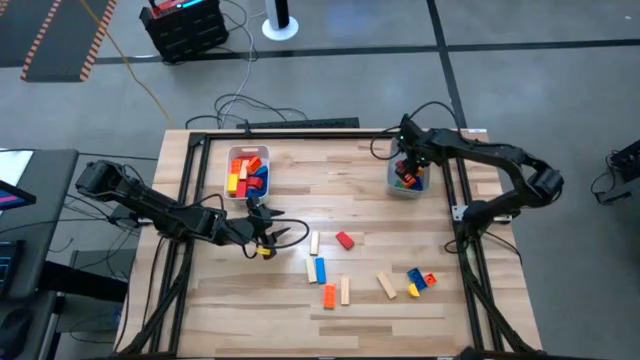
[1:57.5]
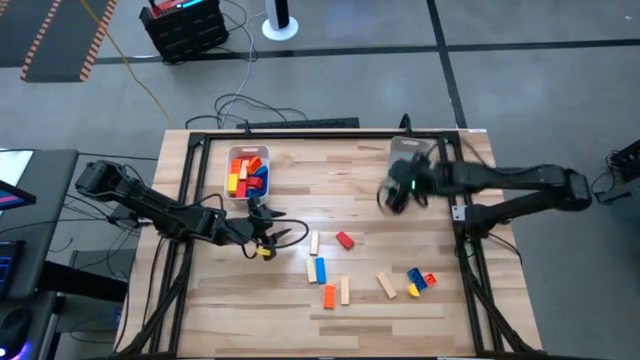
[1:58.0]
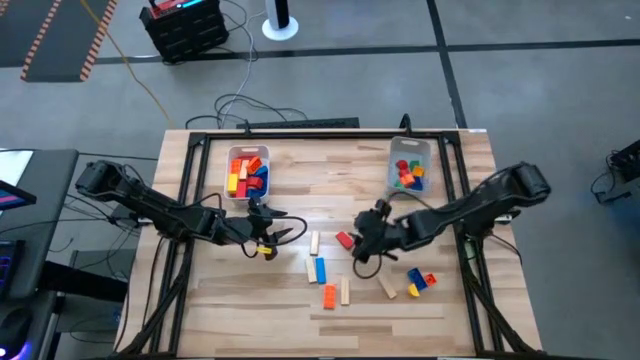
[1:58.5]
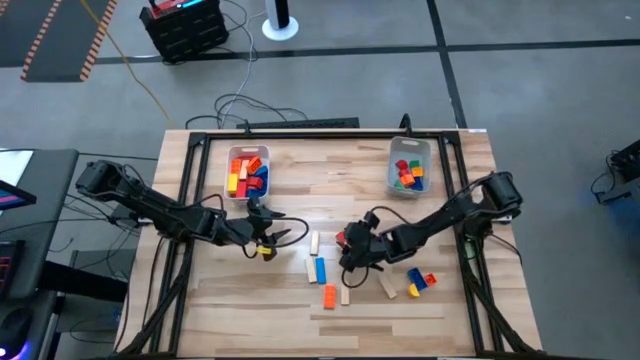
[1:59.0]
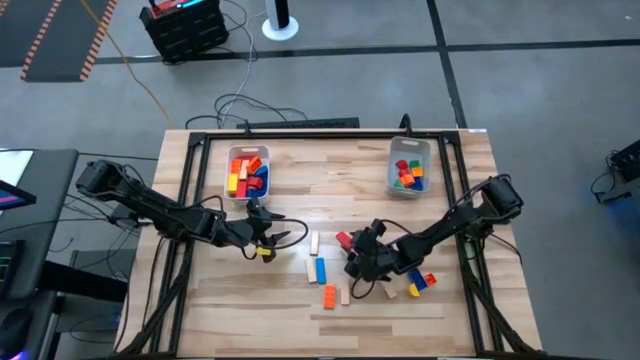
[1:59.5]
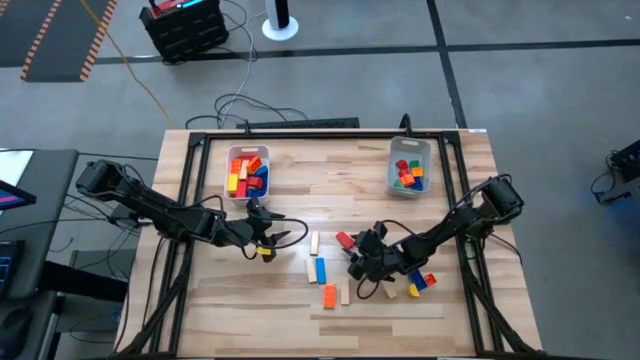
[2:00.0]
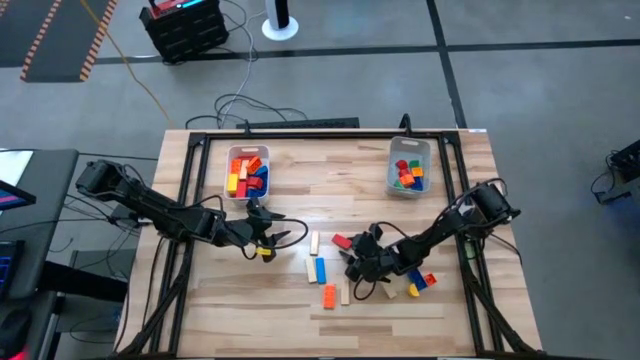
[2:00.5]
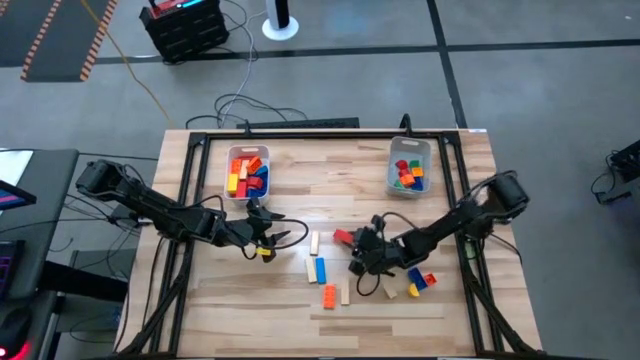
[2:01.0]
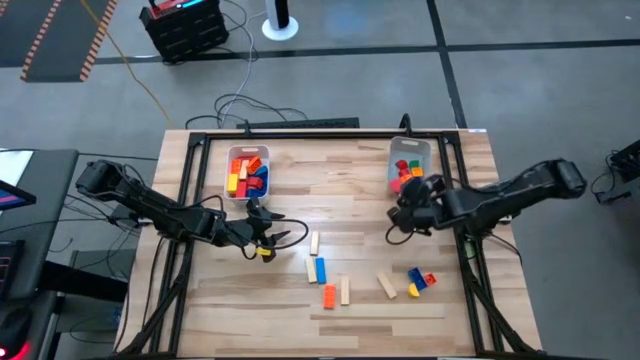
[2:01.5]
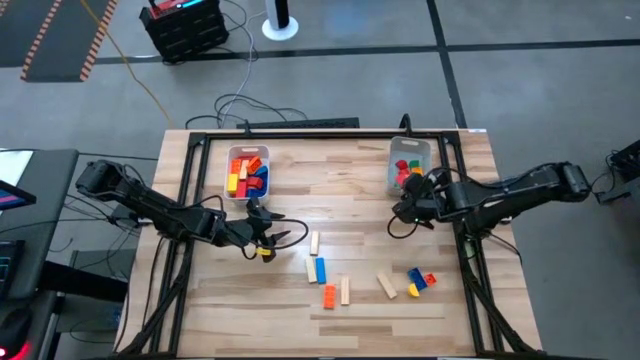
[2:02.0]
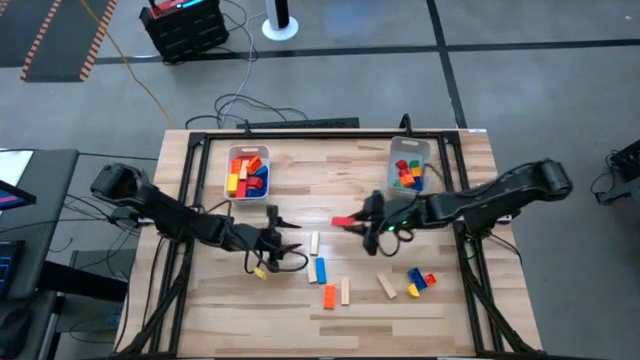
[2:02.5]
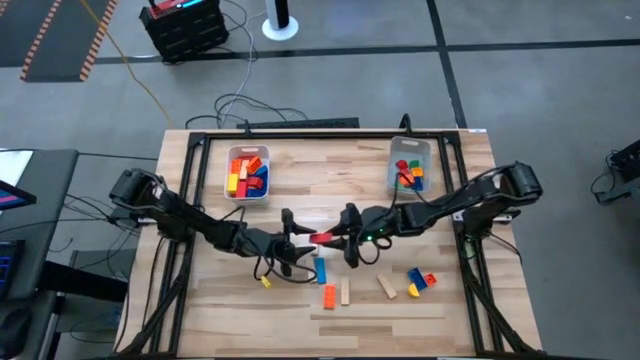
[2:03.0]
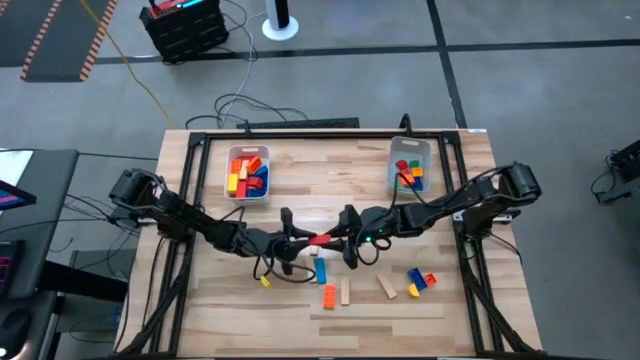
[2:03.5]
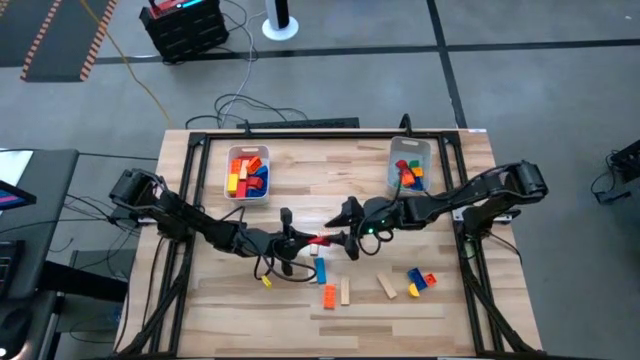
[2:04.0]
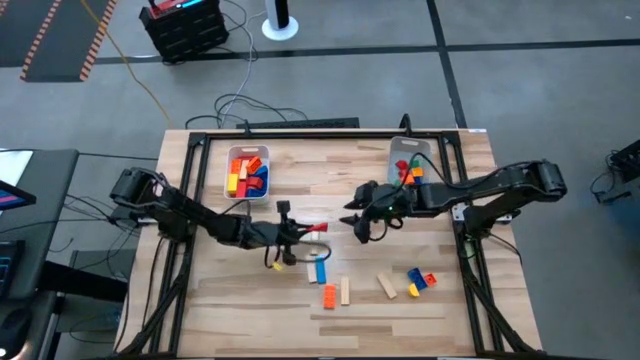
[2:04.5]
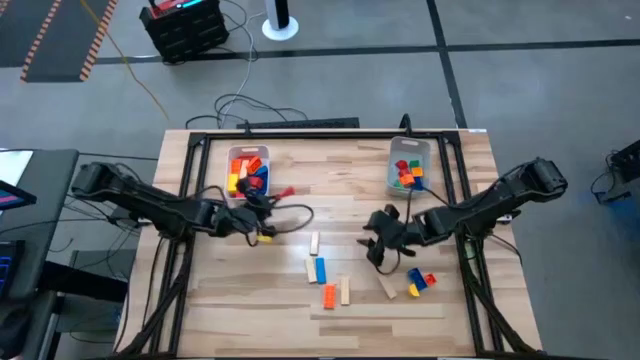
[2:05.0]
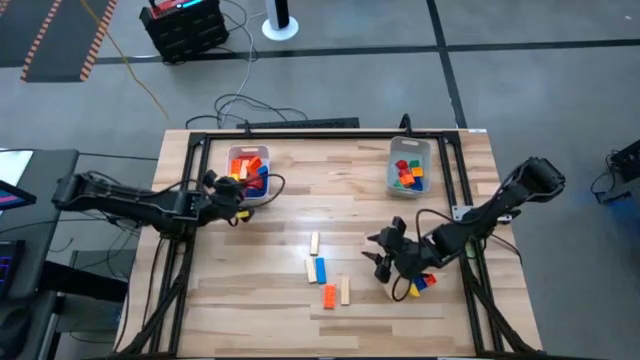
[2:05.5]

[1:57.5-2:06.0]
Task: Sort blocks by size
Put the large red block into the white bin

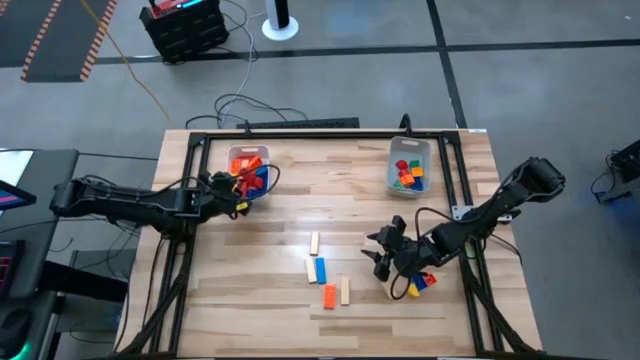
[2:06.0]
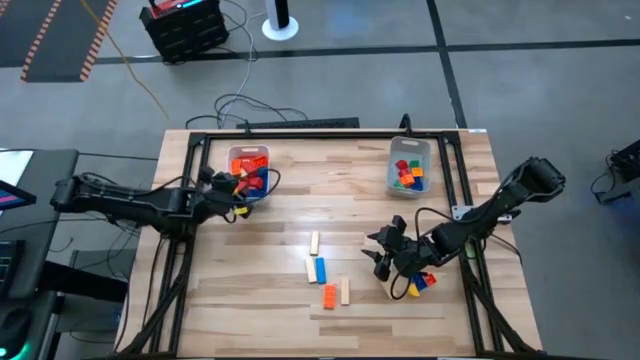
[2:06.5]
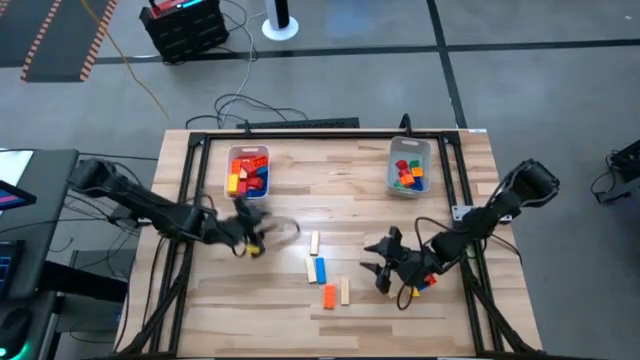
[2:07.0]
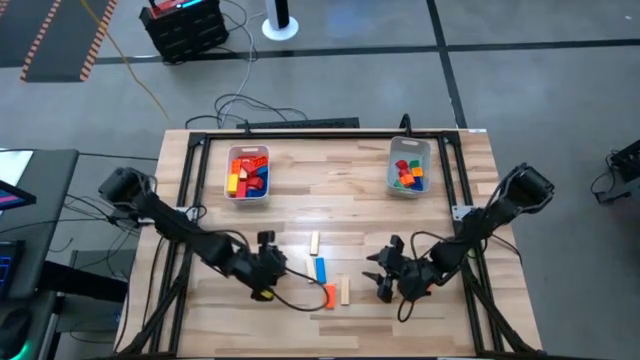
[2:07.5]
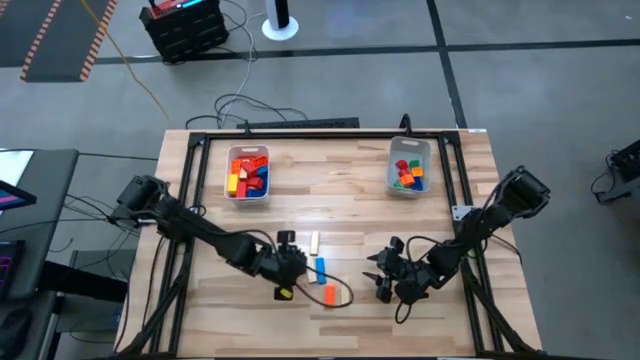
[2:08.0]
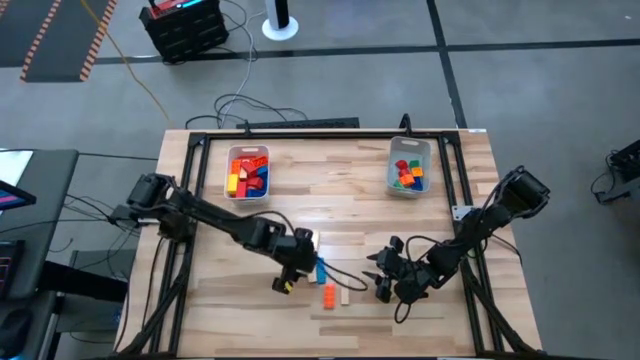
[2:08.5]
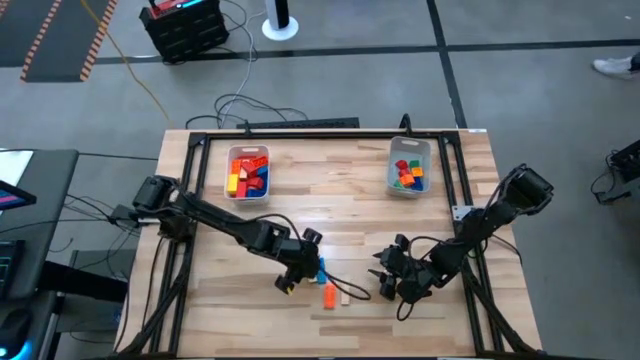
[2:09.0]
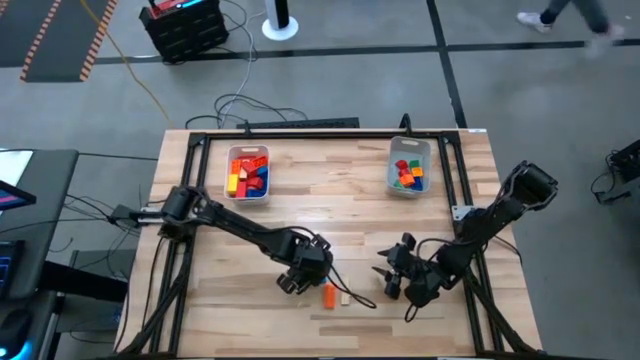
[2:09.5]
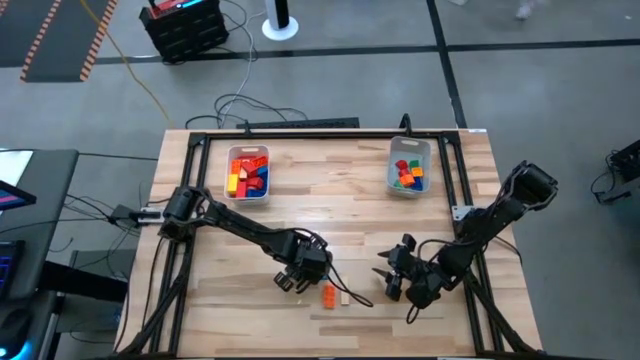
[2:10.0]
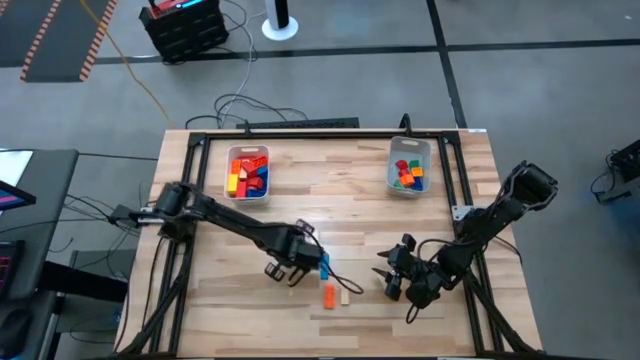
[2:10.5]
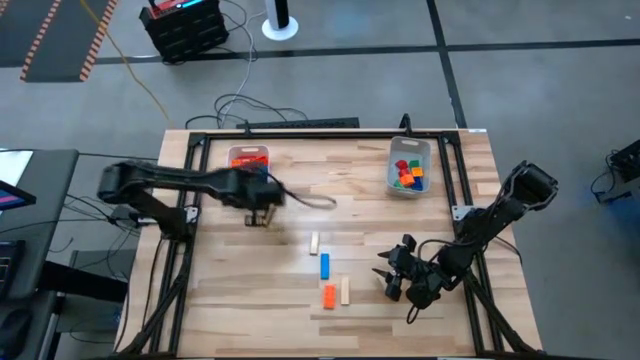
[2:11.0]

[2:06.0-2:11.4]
Put the large light brown block into the white bin

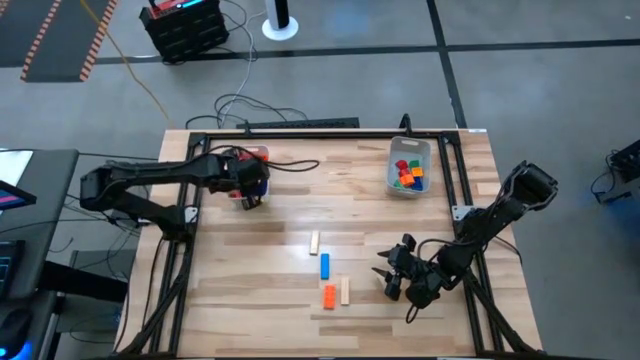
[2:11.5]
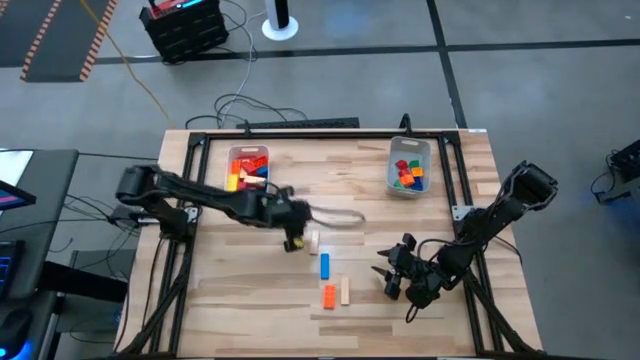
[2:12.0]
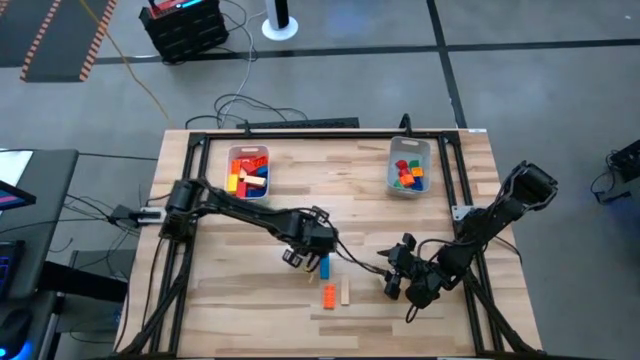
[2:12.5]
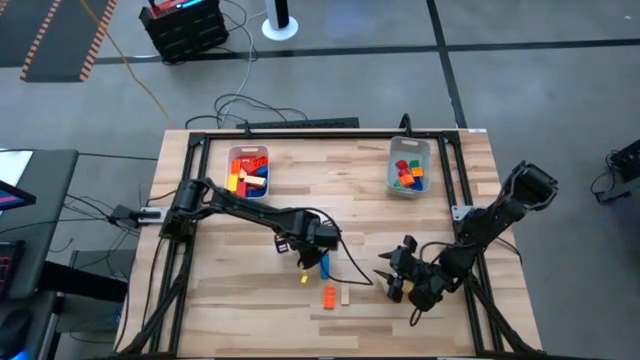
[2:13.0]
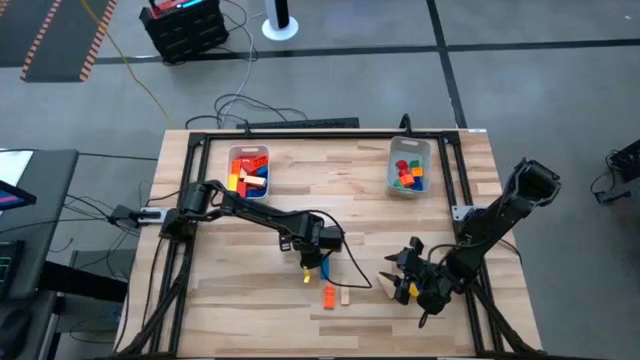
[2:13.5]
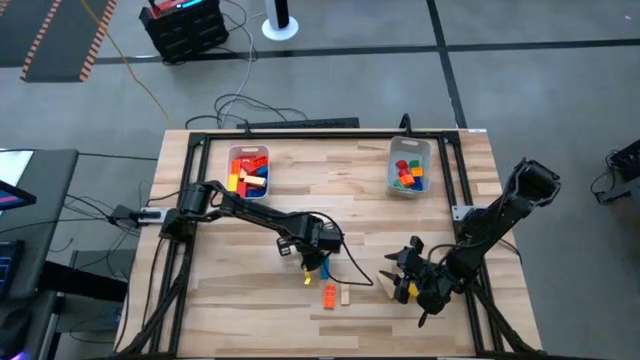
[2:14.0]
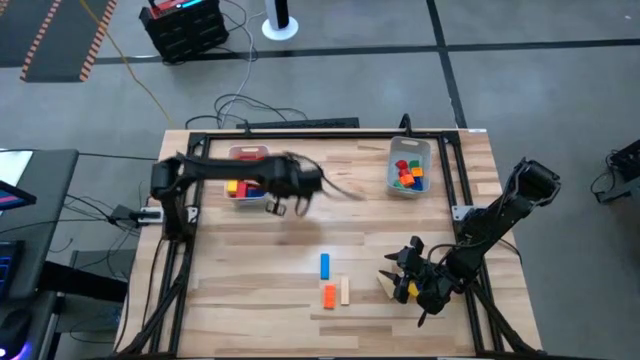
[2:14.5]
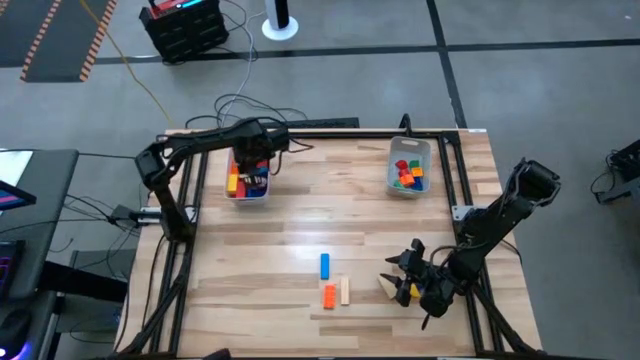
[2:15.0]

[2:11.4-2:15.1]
Put the large light brown block into the white bin

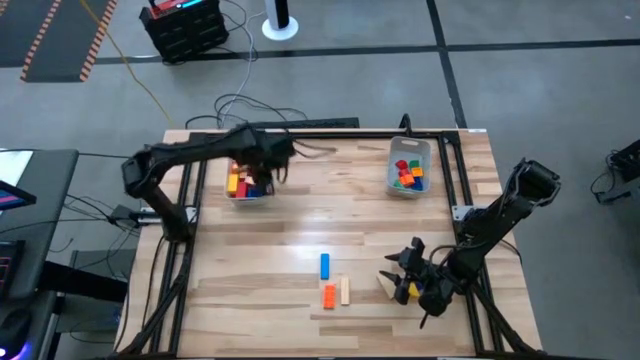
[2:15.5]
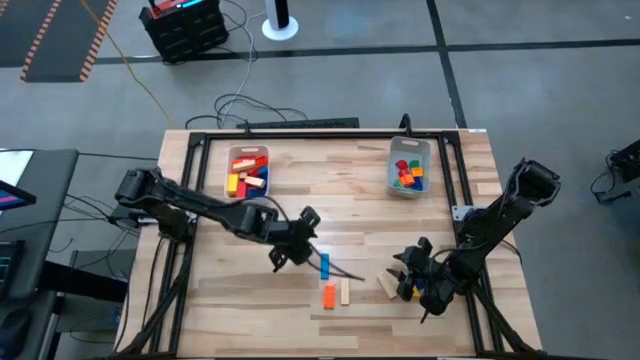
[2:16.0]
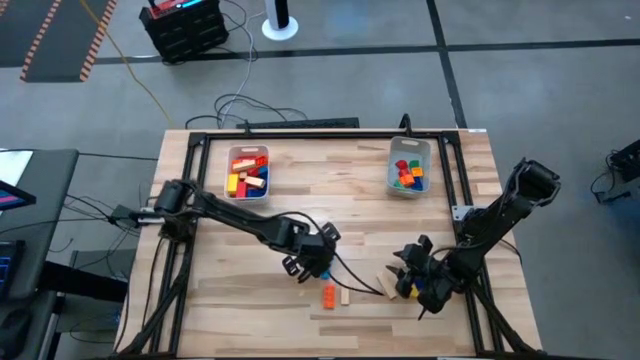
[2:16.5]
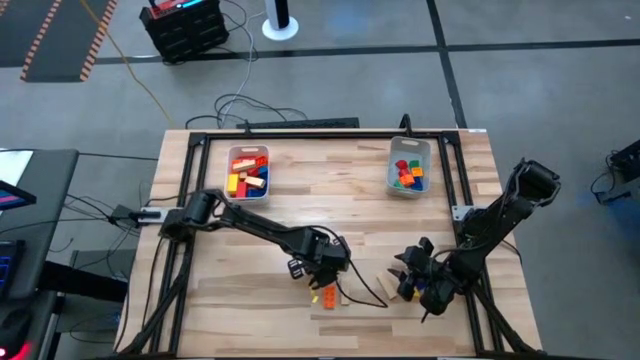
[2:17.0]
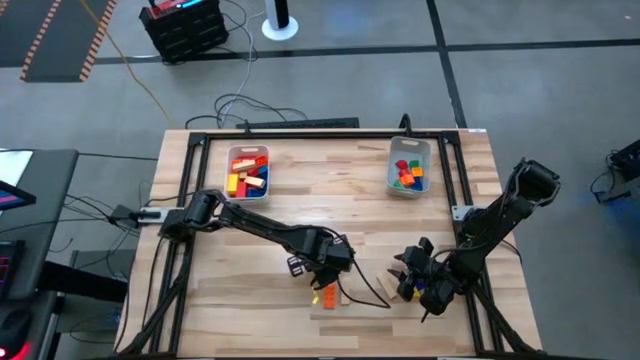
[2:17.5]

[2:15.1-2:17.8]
Put the large blue block into the white bin

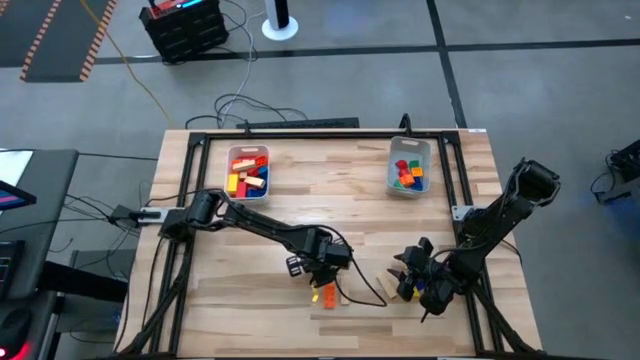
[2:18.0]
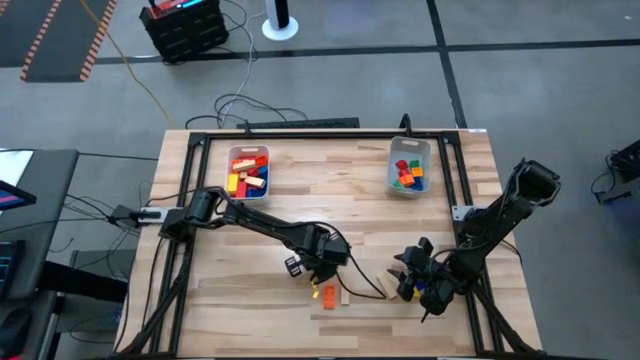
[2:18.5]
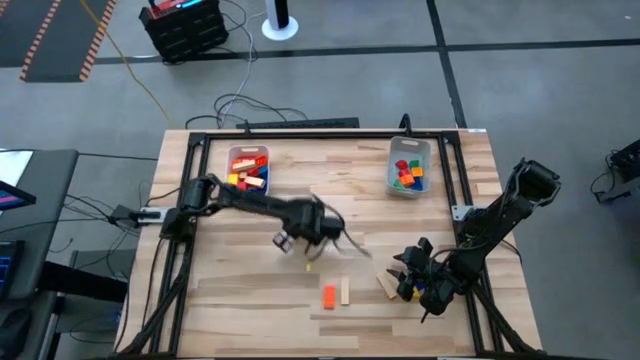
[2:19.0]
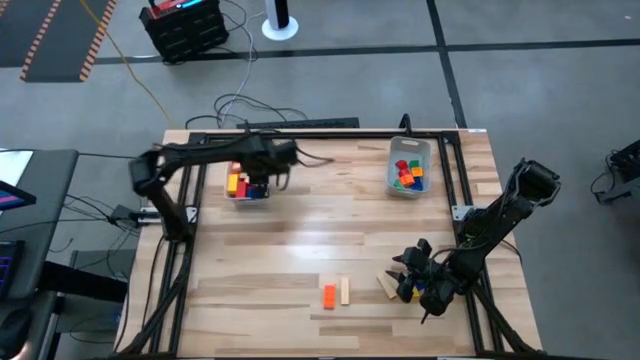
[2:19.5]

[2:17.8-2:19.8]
Put the large blue block into the white bin
